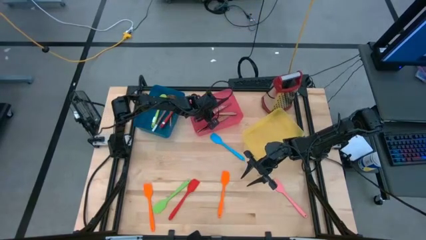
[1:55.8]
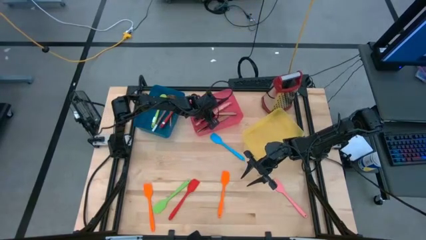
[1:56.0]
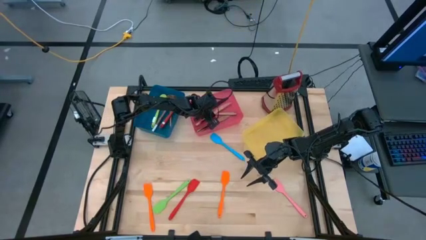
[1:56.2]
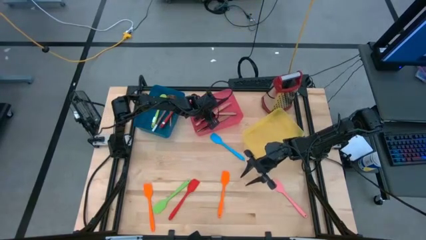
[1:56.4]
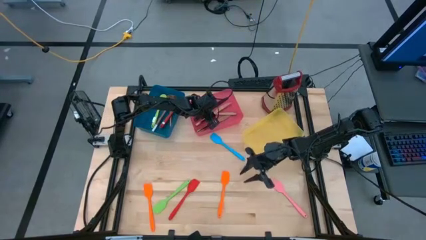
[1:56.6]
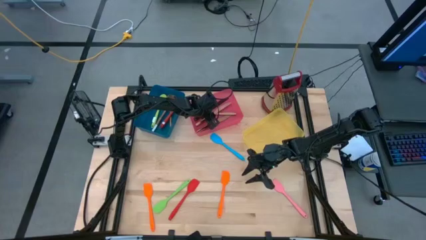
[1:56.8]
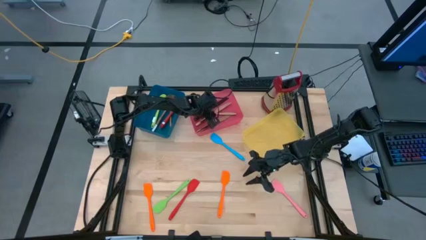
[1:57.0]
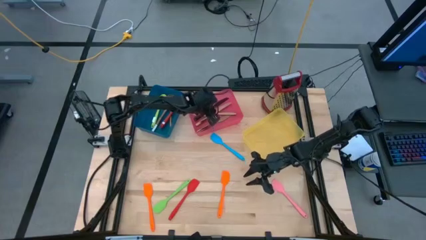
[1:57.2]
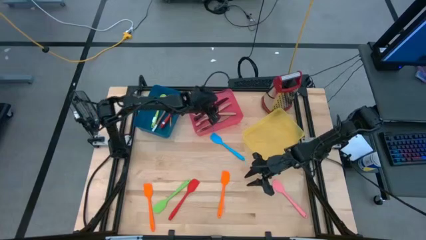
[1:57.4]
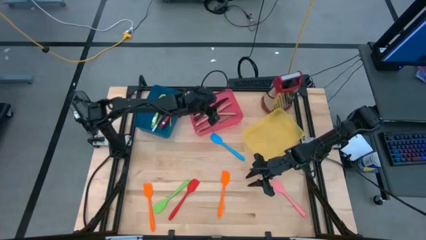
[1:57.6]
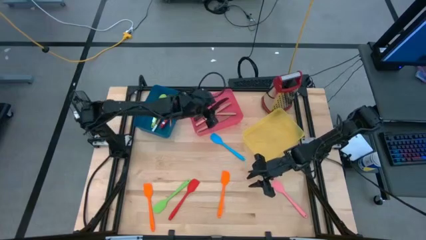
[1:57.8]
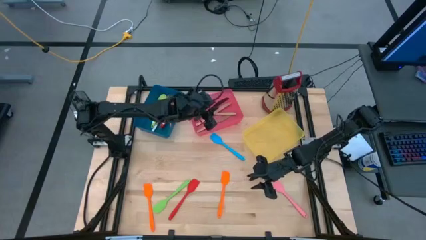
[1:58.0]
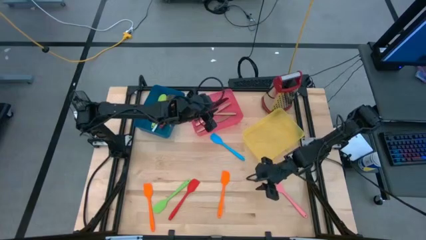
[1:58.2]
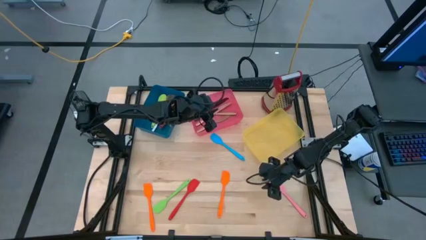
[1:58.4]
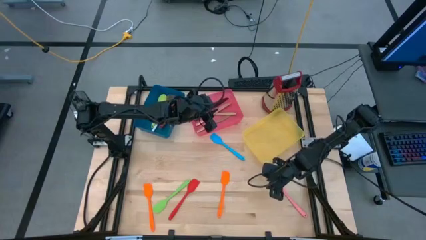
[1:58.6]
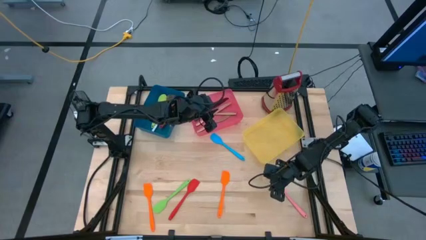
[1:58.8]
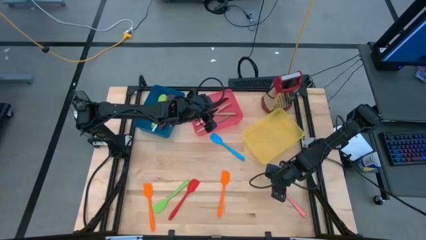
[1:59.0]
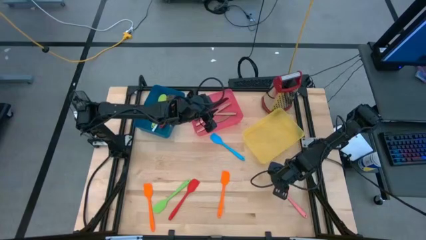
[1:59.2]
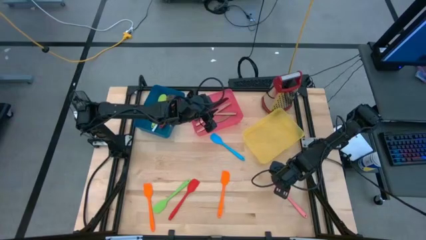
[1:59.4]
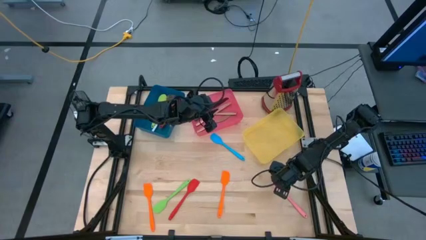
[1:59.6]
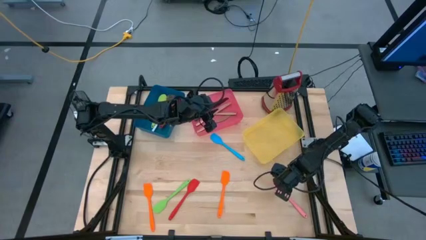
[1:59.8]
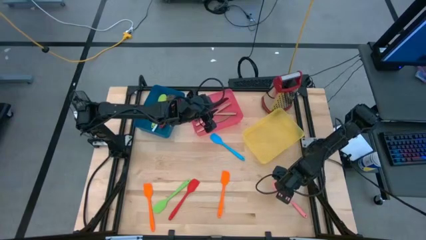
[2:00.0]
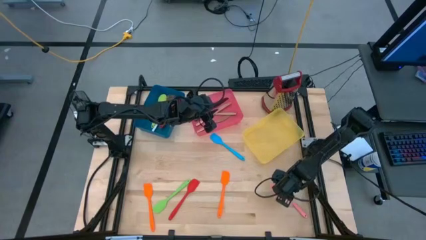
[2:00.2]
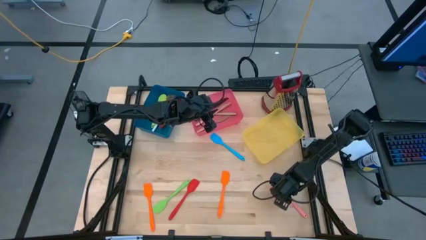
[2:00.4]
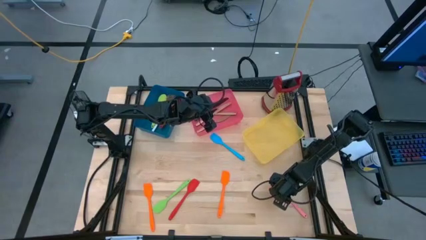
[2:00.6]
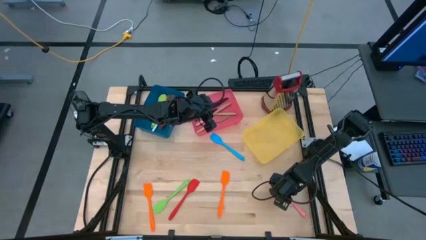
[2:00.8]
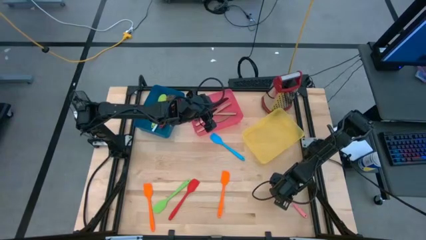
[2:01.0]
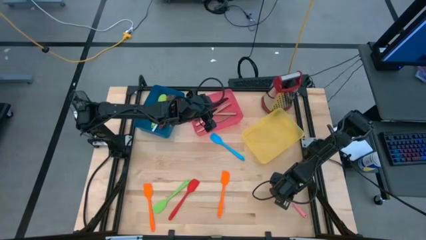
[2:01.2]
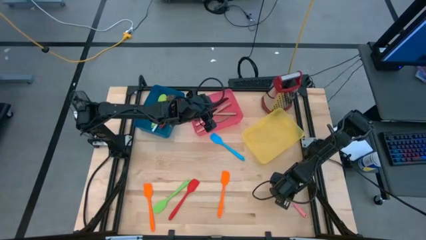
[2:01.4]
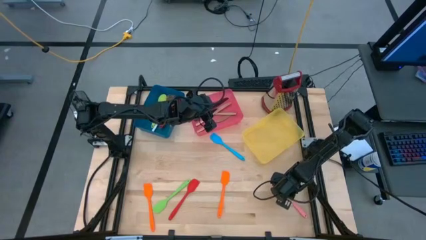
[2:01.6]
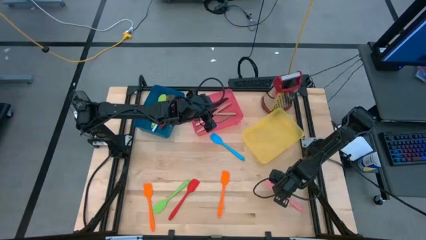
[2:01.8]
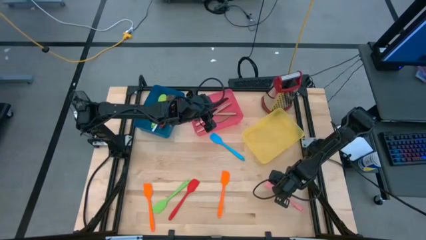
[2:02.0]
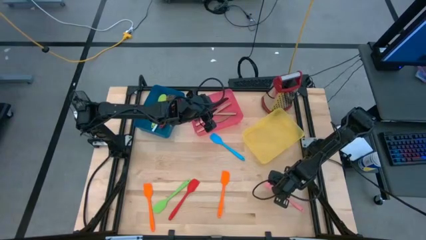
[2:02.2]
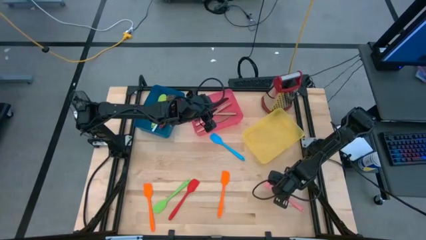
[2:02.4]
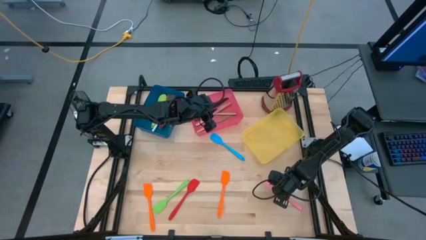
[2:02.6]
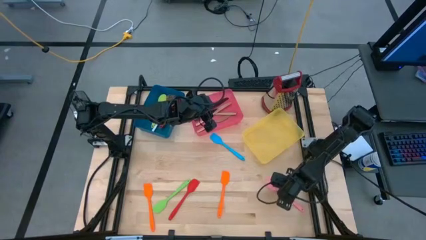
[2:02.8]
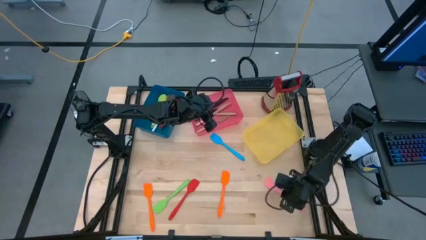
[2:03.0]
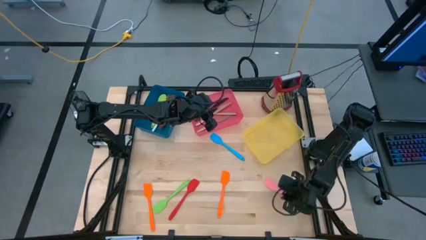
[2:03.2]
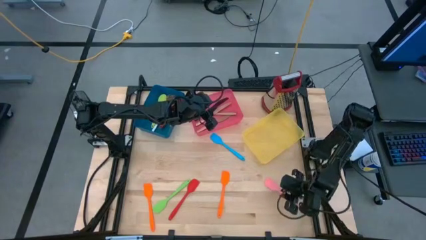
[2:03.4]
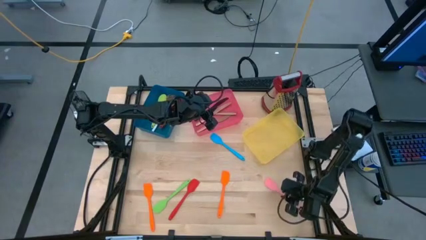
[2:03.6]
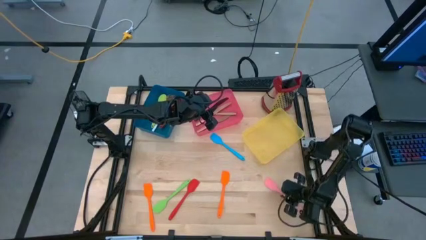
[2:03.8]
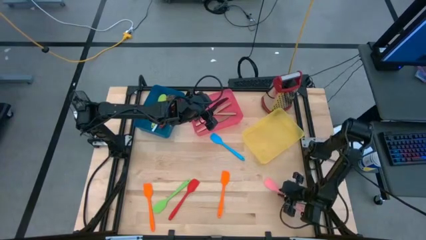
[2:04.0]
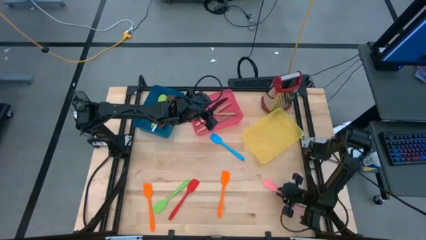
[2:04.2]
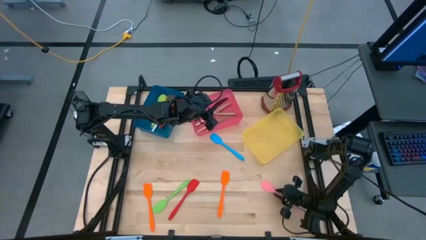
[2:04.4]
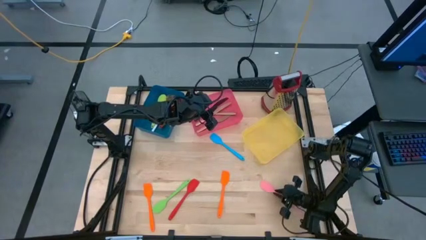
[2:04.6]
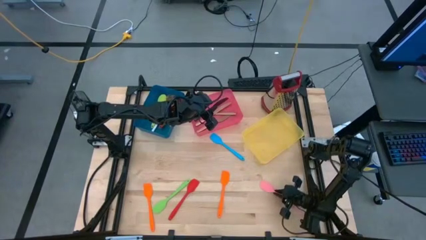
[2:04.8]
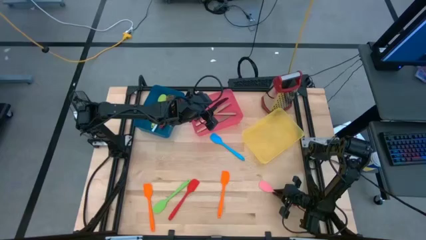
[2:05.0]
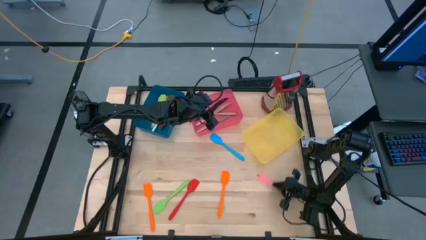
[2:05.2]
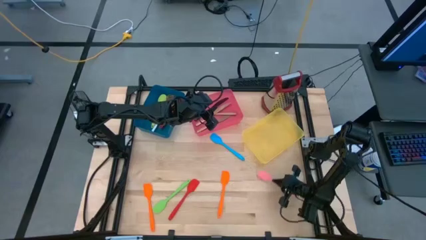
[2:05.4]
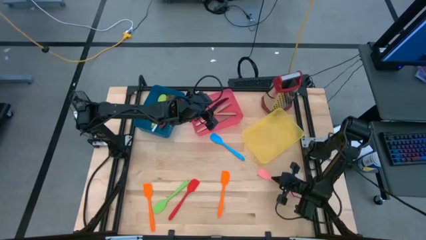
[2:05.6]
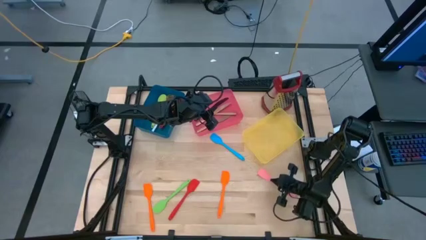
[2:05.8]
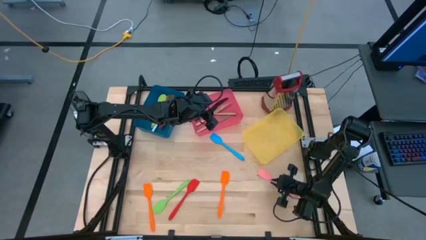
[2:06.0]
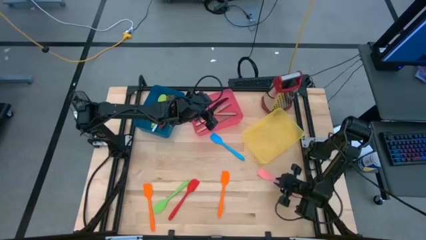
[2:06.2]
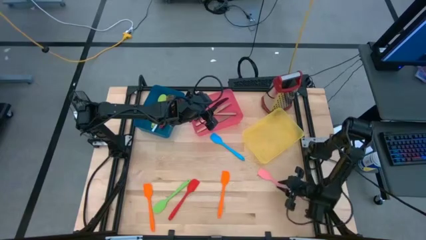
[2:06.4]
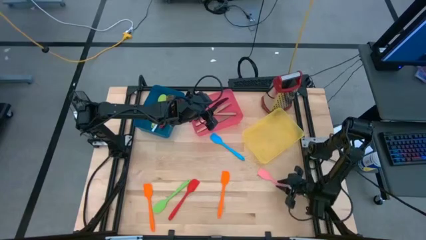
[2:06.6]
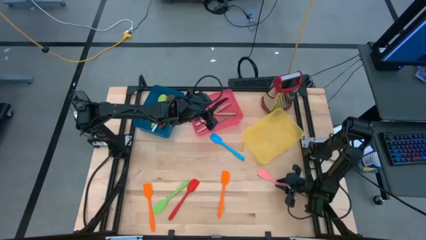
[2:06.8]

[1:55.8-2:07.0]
Task: Pick & Place Kitchen Items
Put the pink spatula into the yellow bin

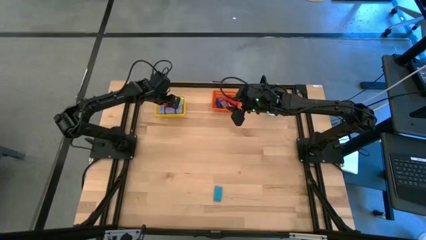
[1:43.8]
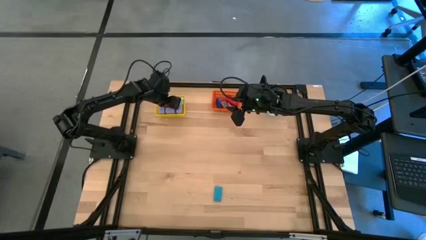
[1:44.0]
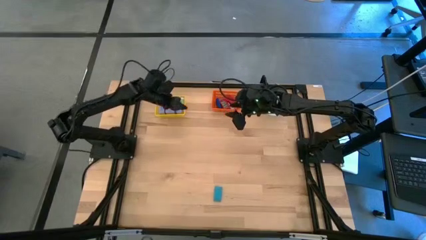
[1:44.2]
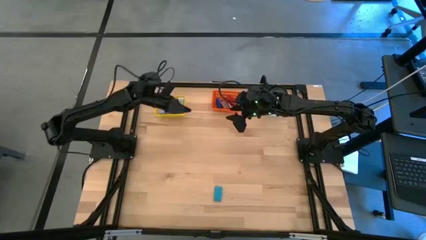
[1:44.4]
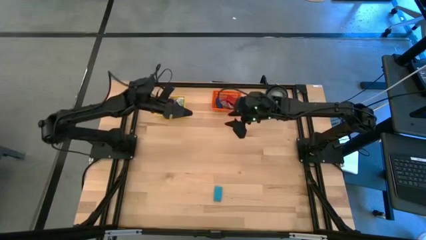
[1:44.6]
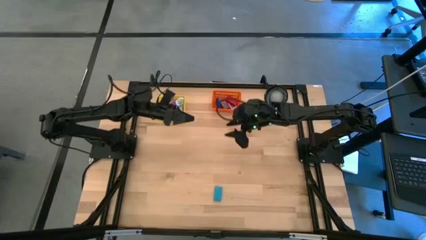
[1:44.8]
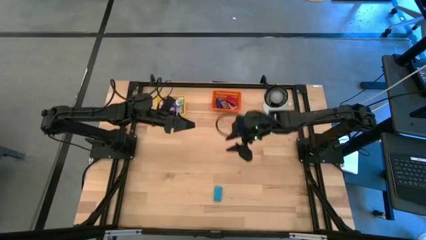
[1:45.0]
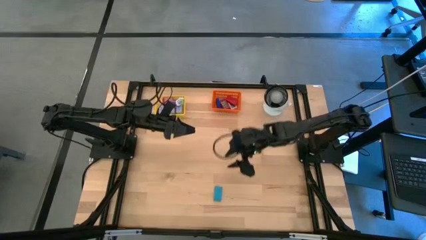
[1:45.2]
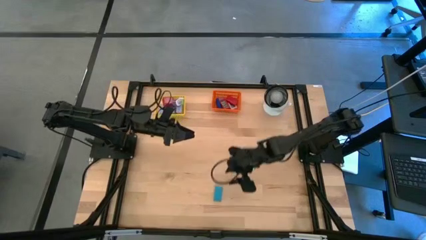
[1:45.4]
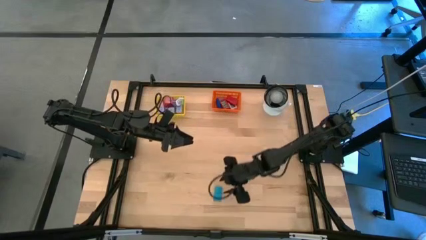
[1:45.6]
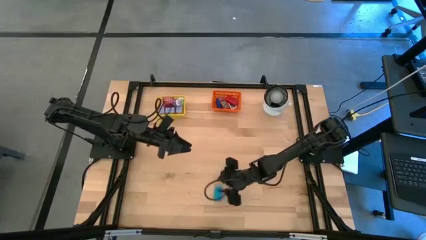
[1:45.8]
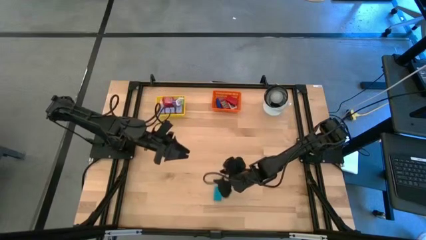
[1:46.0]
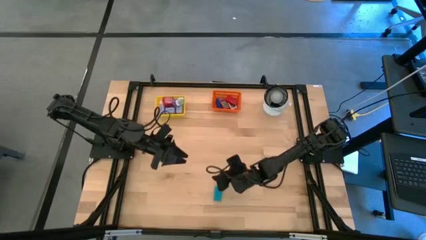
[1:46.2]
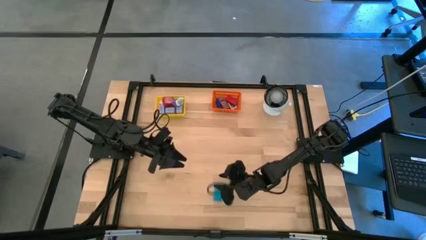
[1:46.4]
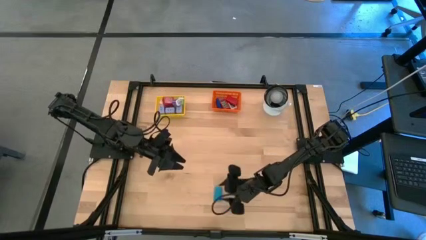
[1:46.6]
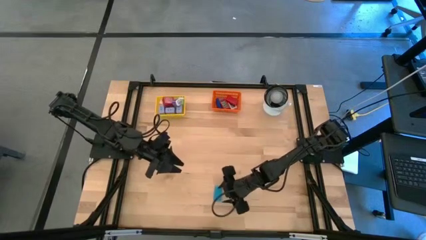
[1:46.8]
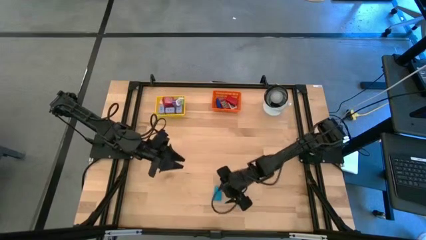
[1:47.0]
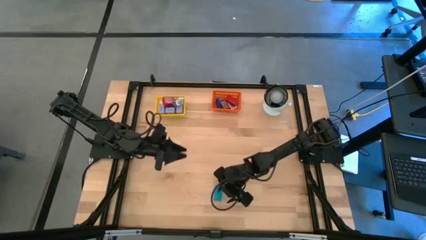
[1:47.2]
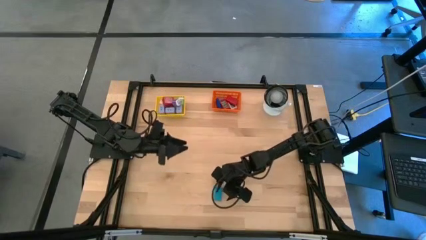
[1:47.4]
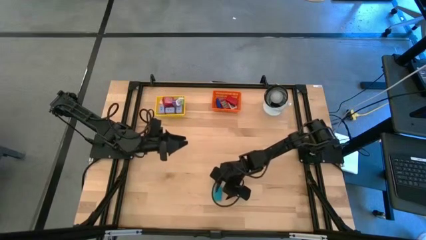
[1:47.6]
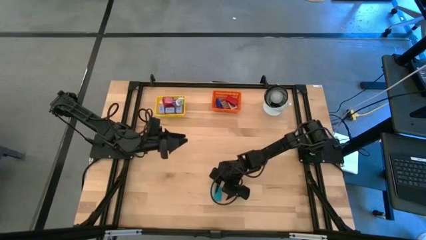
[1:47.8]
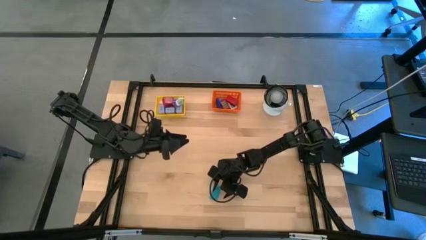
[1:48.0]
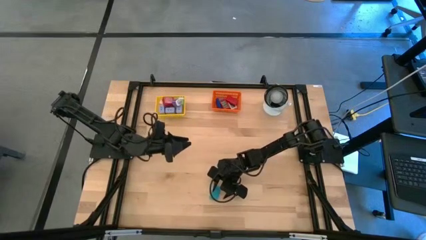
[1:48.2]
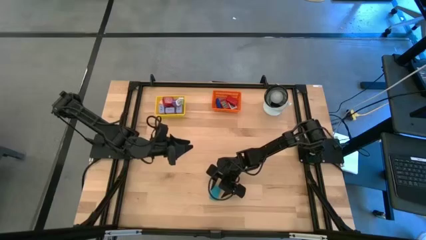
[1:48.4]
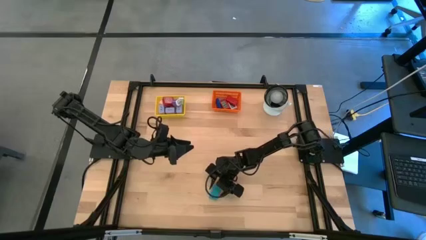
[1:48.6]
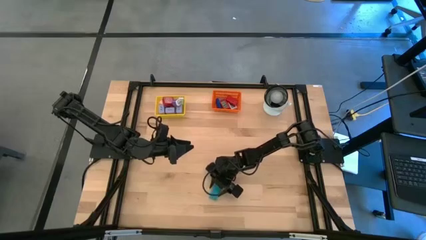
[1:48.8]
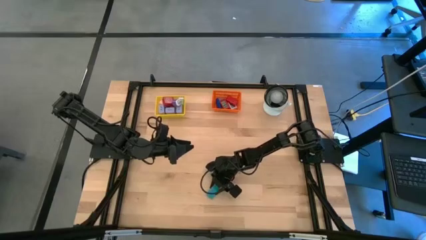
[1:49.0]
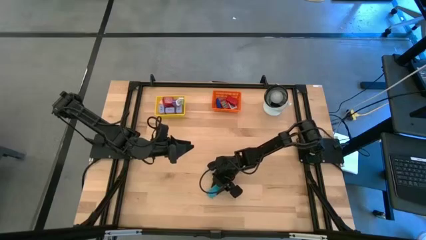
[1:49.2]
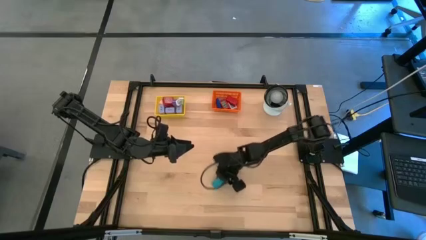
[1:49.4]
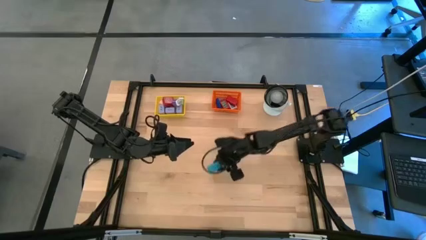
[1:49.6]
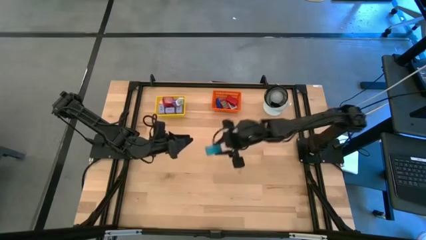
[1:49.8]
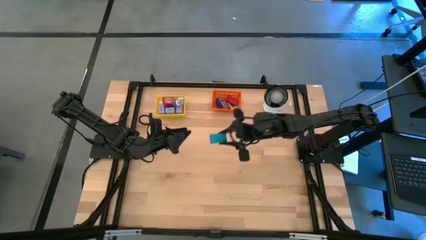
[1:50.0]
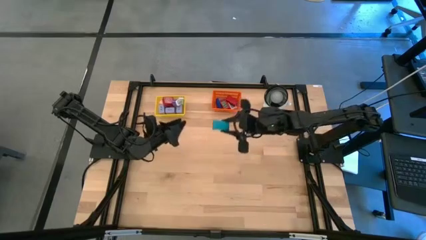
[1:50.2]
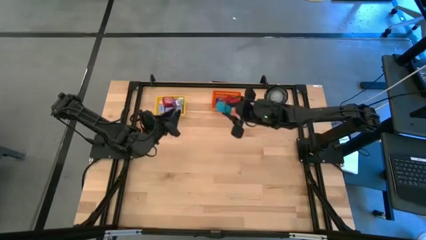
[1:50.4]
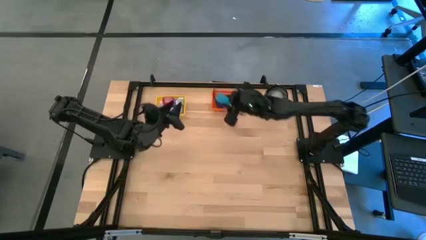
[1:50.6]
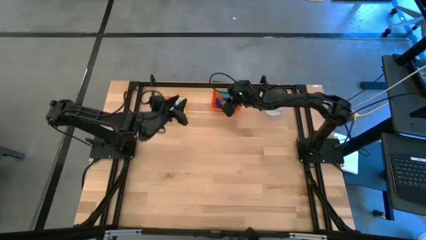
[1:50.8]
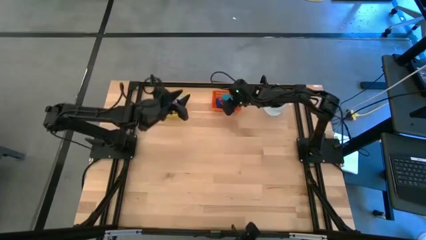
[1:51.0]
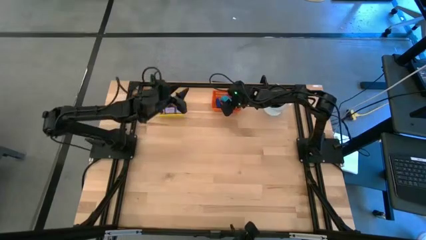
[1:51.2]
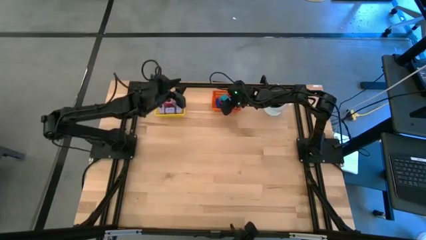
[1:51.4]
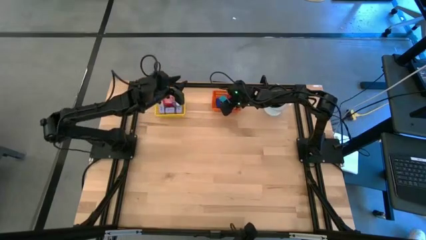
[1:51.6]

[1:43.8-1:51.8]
Task: Pick & Place Office items
Put the blue digital timer into the orange bin
